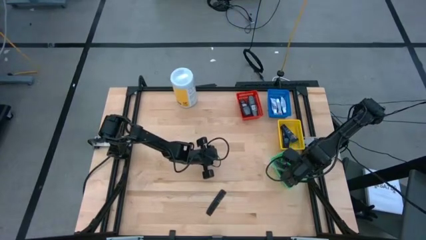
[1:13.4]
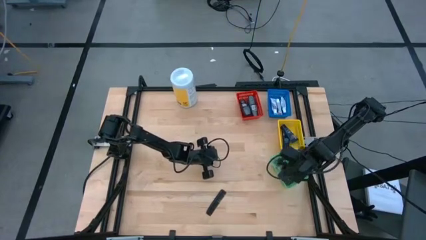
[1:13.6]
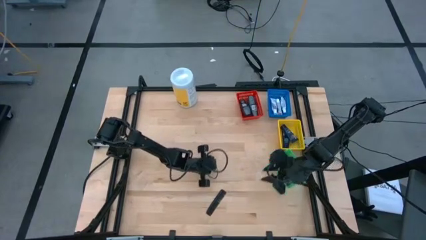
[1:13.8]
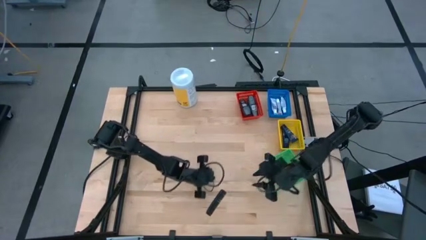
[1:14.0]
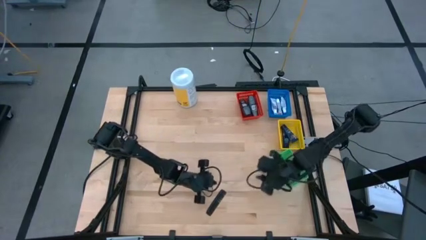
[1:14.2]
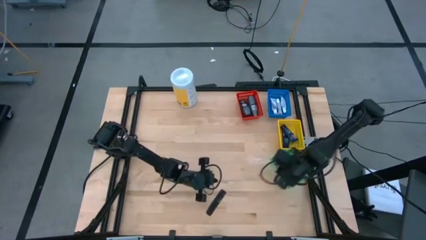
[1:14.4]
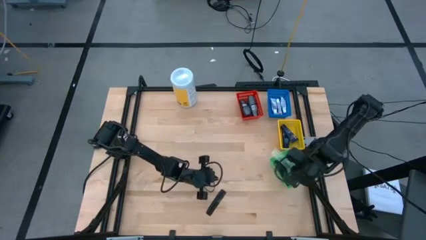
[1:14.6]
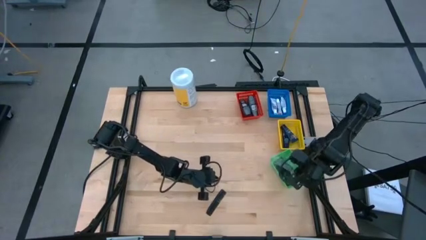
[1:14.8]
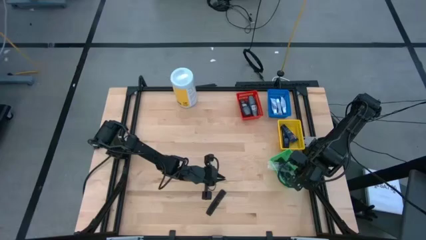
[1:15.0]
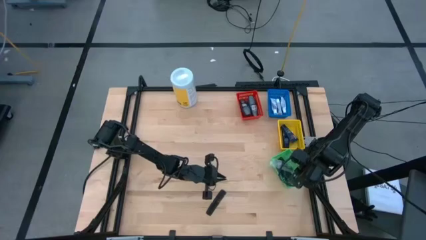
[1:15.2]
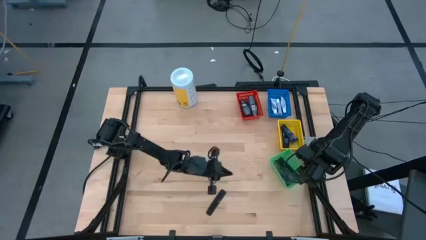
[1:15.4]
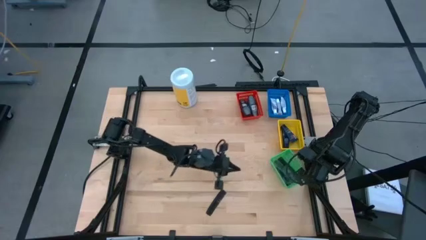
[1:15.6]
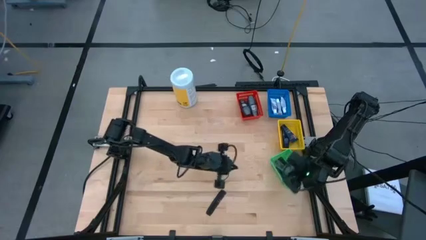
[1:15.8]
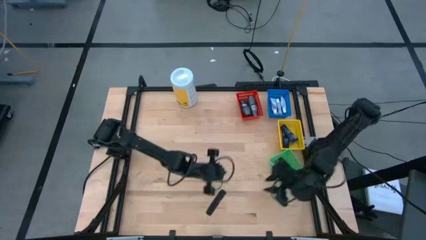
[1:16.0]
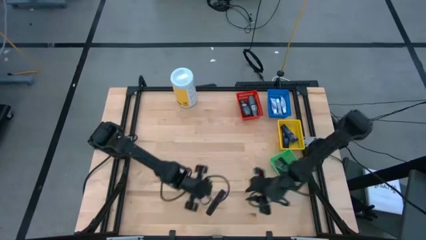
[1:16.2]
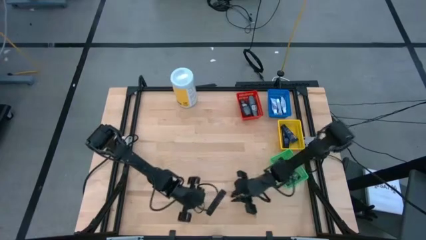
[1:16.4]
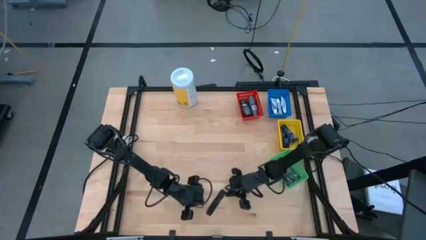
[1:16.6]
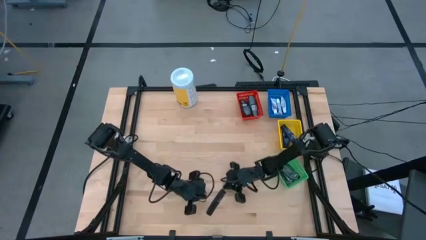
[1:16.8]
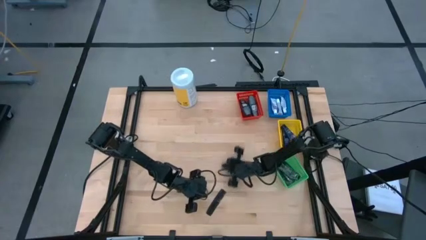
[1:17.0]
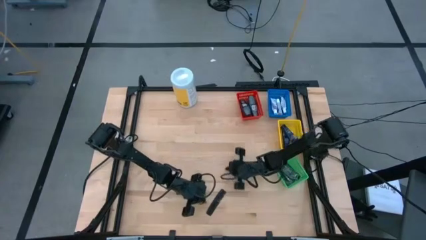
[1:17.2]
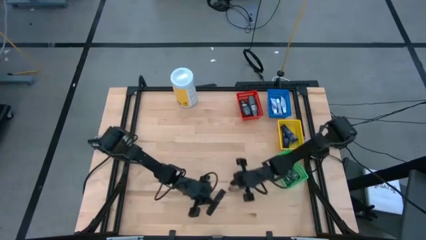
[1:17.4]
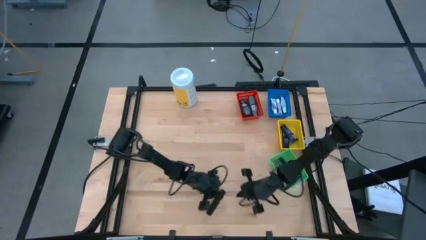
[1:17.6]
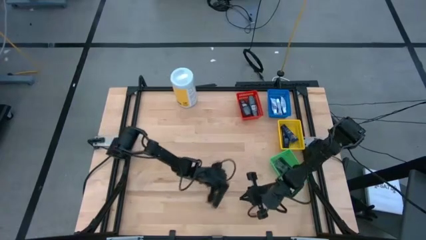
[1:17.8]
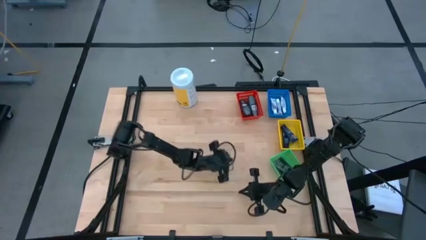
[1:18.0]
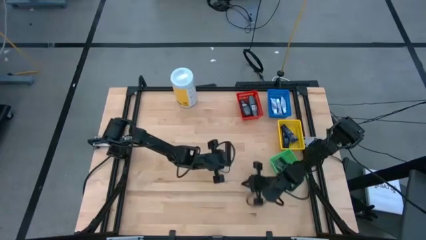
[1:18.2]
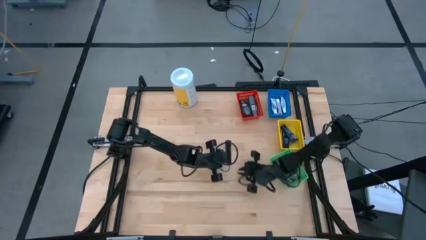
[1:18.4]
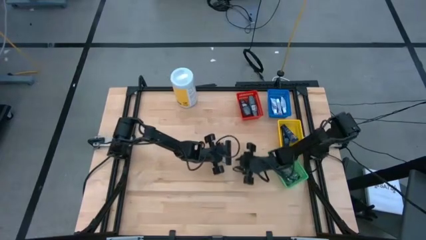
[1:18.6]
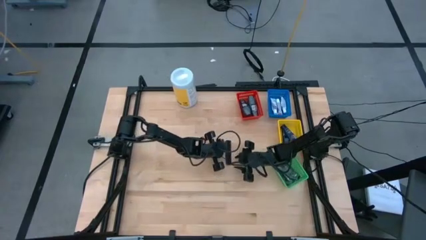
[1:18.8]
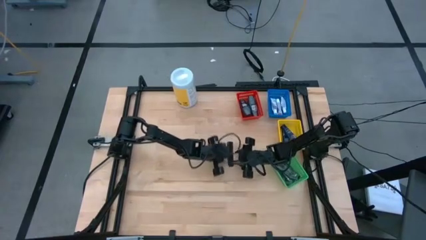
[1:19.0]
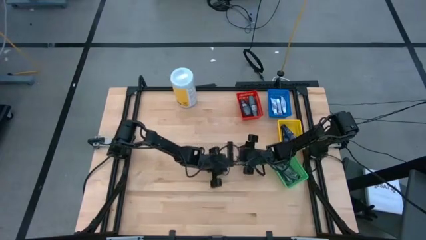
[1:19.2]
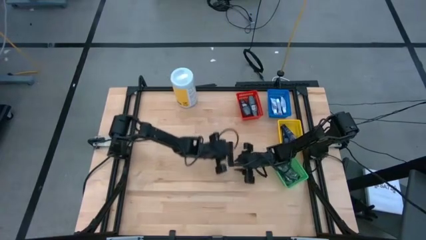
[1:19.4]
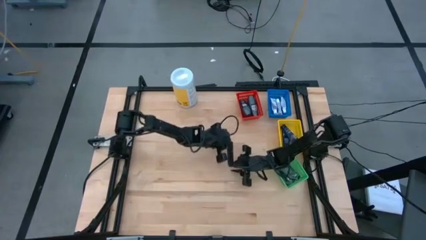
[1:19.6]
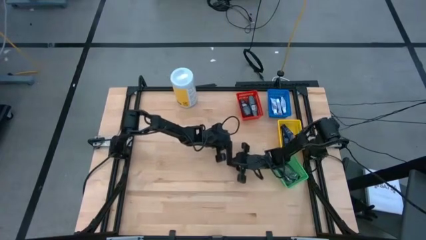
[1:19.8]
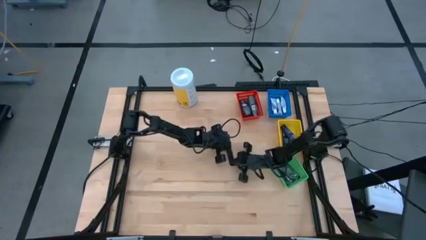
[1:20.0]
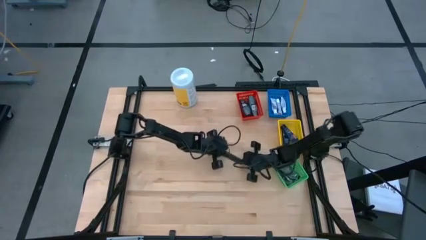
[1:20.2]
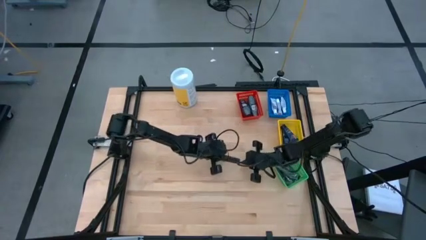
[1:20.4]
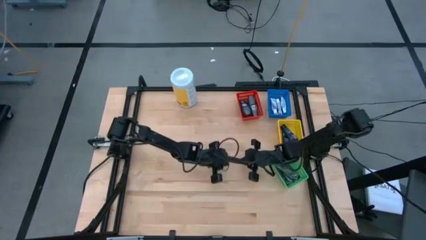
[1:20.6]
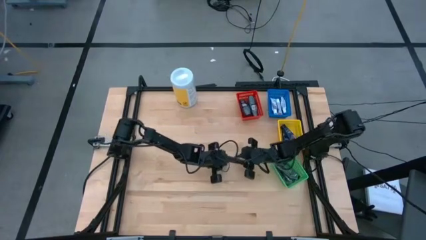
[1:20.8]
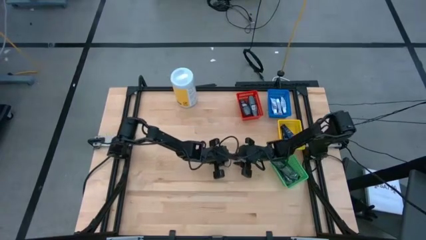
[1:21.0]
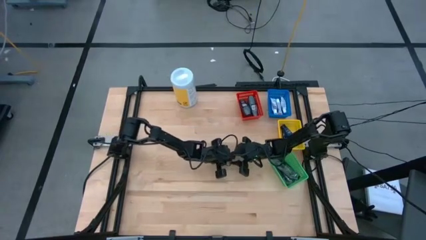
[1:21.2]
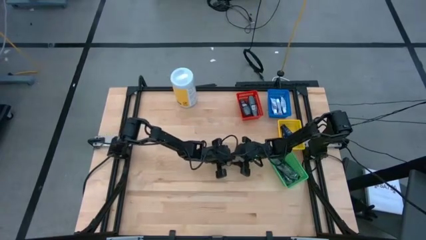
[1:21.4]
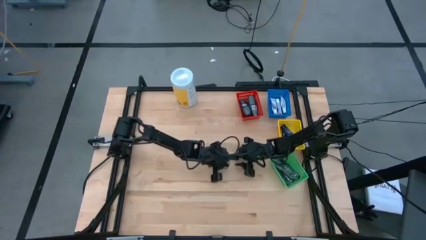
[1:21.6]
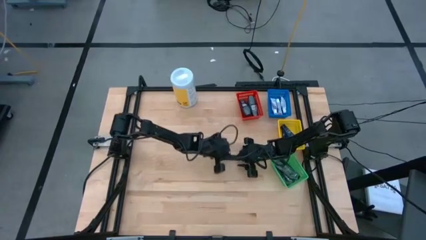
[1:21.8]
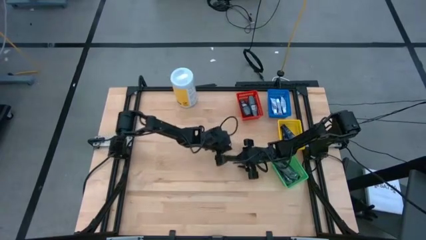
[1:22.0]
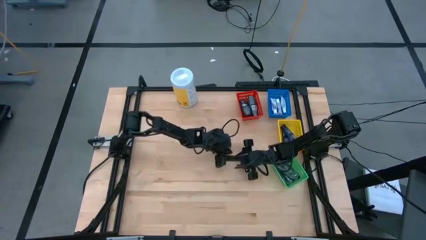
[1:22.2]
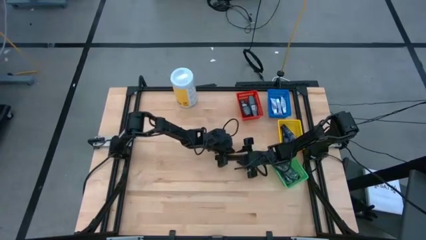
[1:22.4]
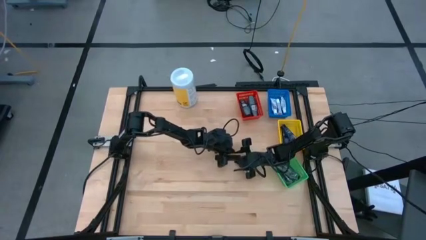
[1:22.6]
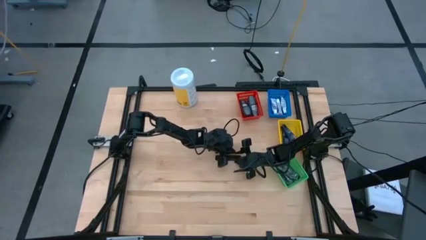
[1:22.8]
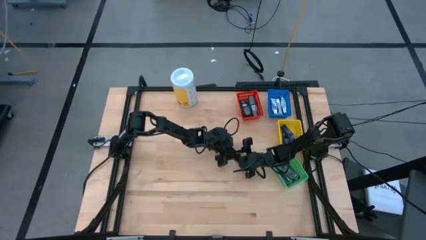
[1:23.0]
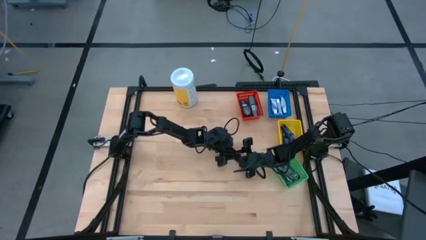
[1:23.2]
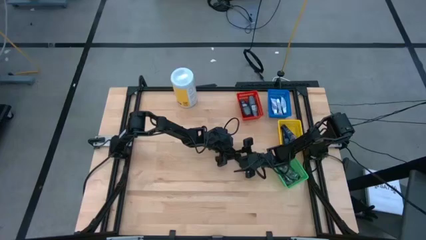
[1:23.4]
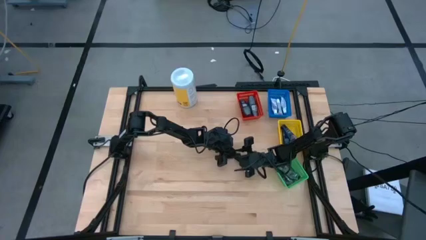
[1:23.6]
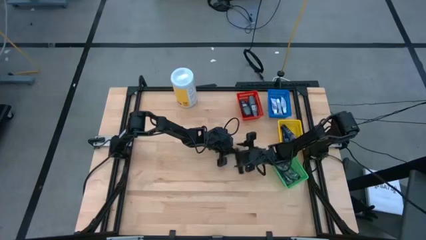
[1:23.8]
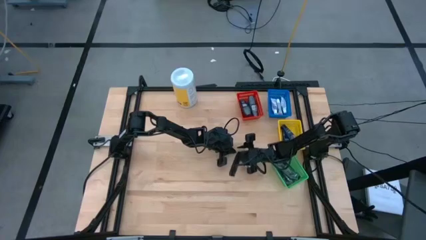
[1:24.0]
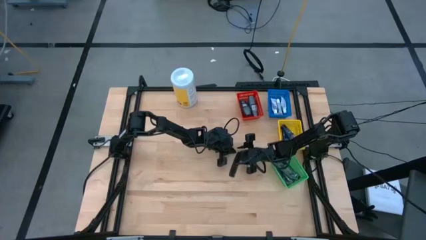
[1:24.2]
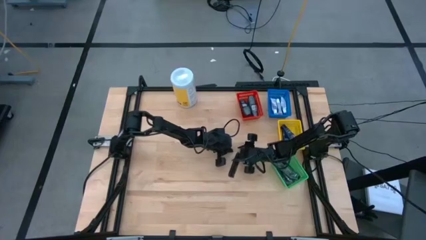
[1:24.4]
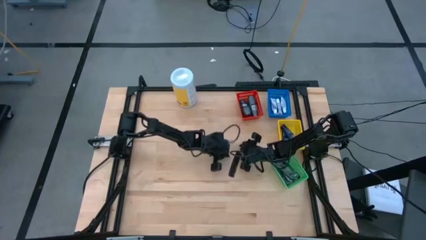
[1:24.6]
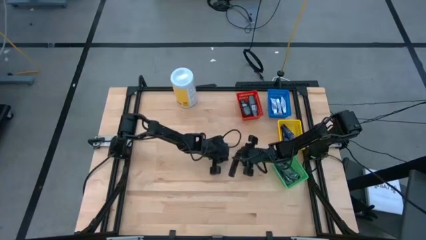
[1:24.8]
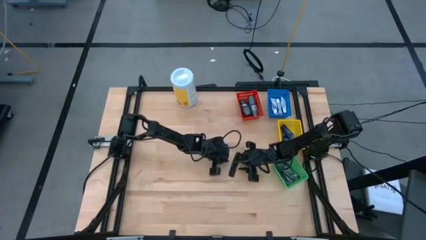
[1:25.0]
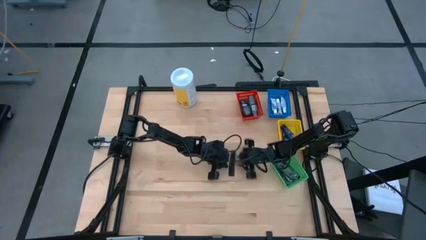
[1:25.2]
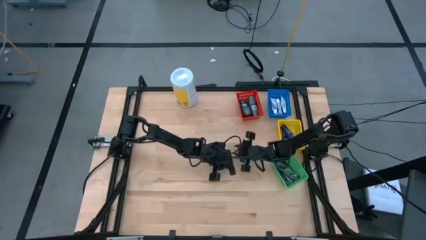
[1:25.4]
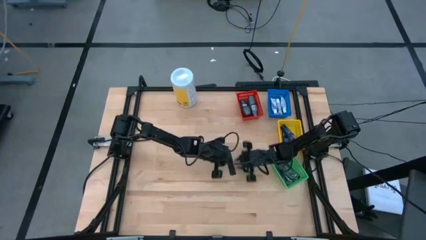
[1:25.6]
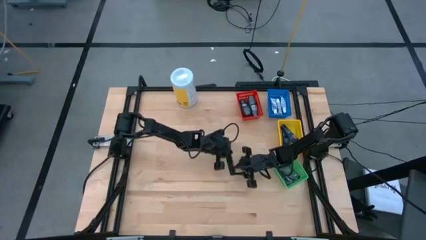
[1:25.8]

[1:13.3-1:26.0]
Task: Pick & Place Travel size toiletries
Put the black comb into the green bin

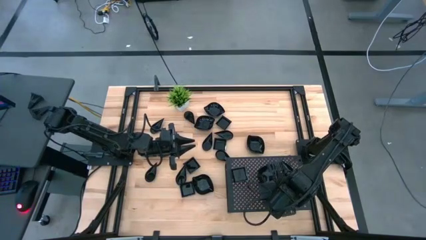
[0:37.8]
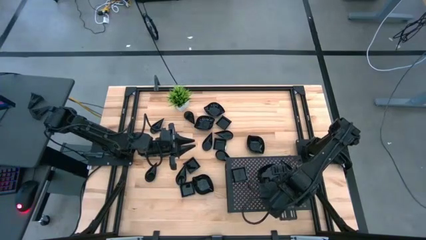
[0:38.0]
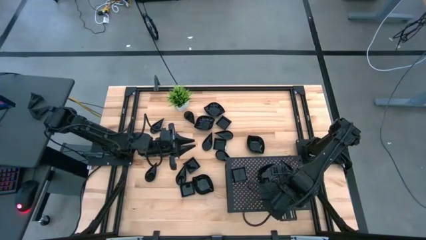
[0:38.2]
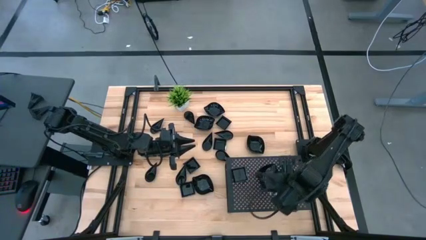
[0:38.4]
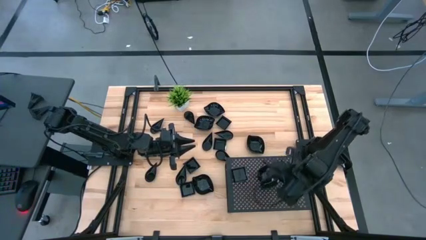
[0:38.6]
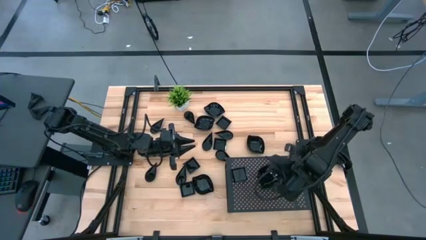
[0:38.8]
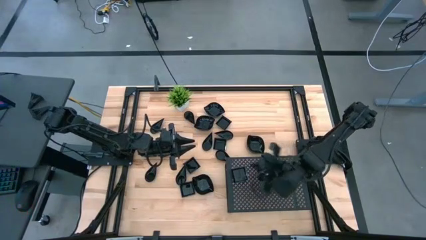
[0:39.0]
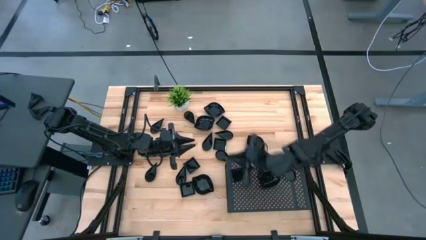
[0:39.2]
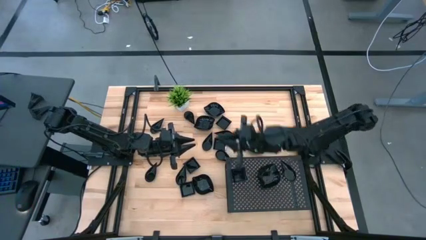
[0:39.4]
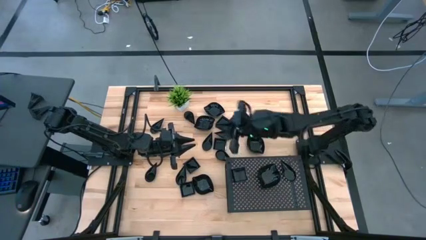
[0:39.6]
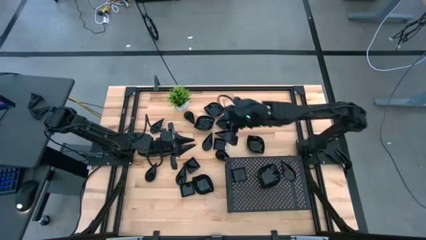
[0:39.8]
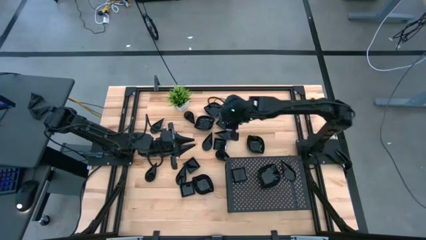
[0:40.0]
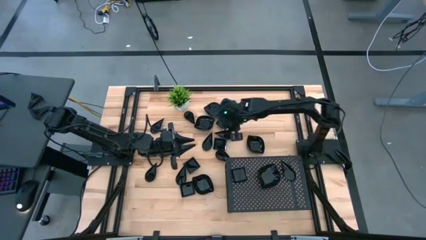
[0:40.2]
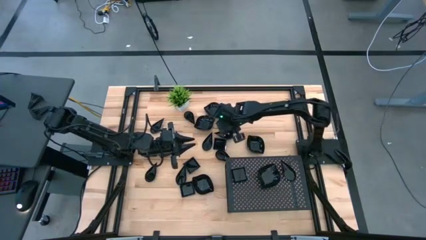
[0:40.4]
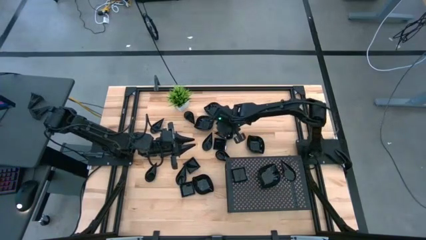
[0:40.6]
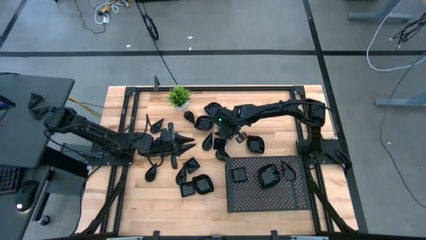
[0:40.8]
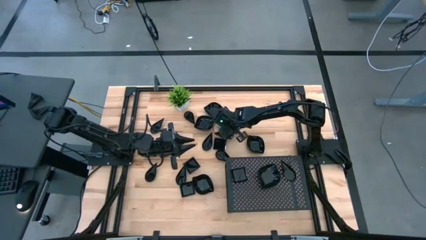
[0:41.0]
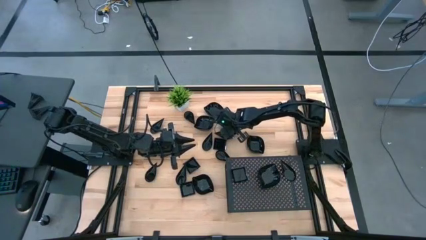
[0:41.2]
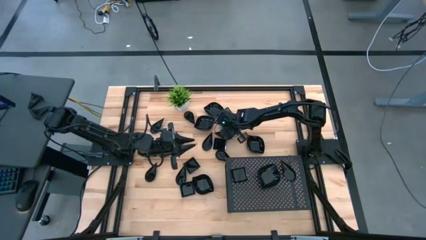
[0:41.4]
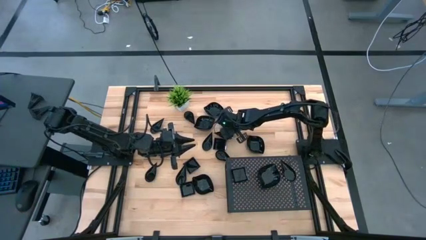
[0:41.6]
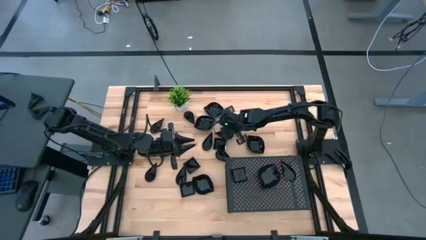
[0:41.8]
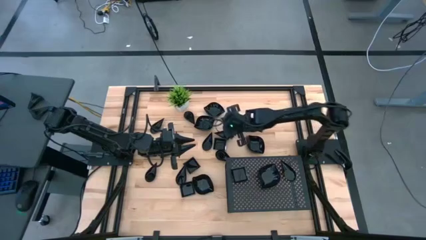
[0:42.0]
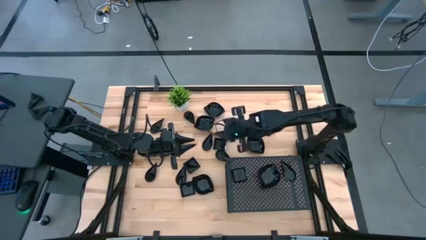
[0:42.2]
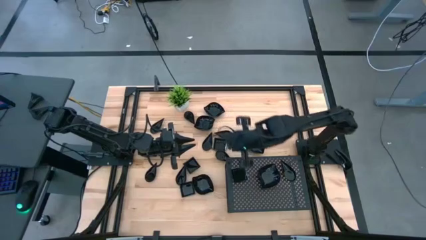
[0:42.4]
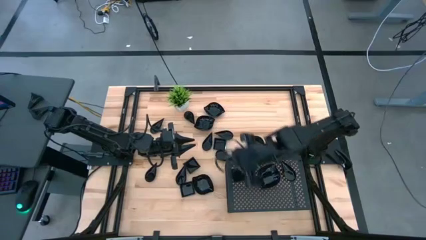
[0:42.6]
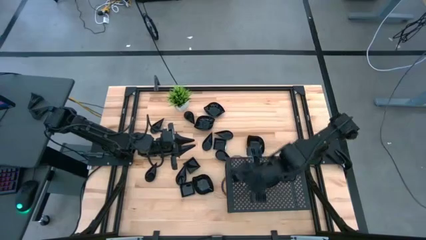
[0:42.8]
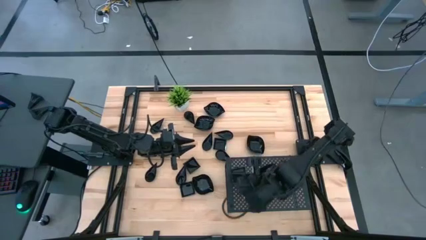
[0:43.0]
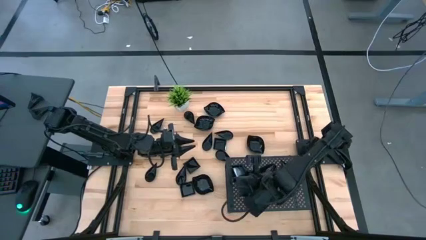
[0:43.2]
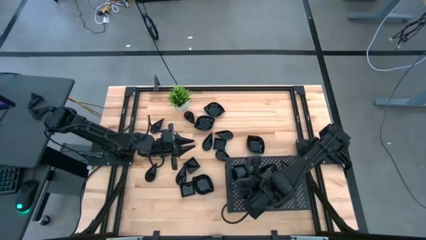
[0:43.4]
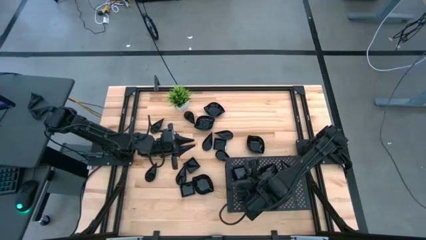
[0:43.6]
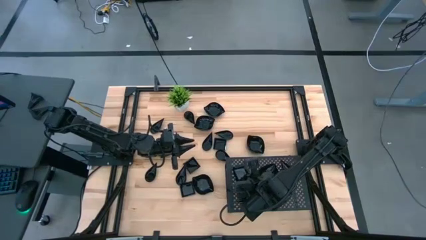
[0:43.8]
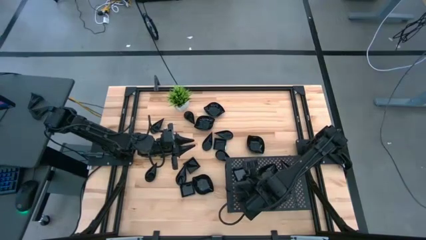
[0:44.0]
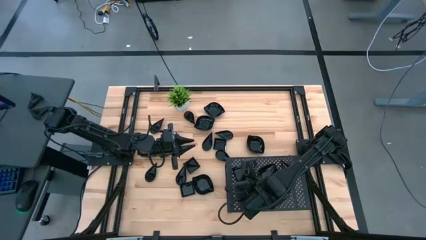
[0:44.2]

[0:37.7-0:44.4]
Task: Pick & Place Mini shaped plates
Stack the square plate on top of the square plate on the shelf
